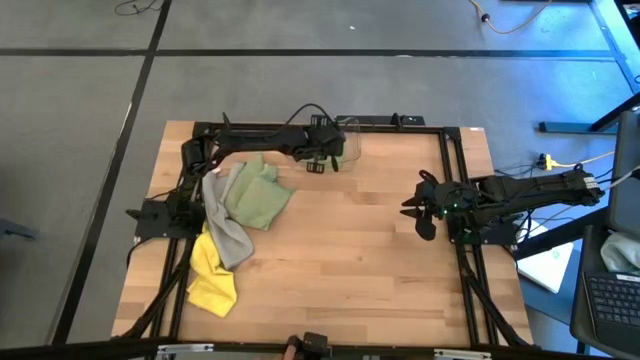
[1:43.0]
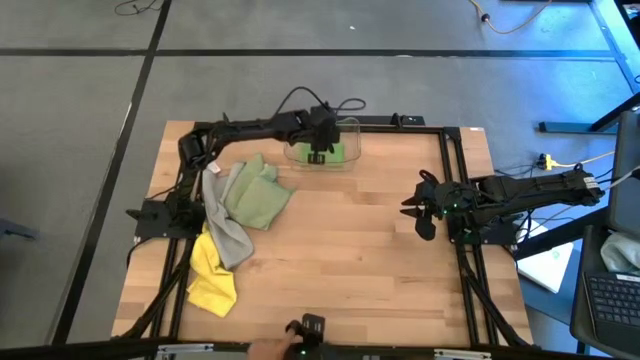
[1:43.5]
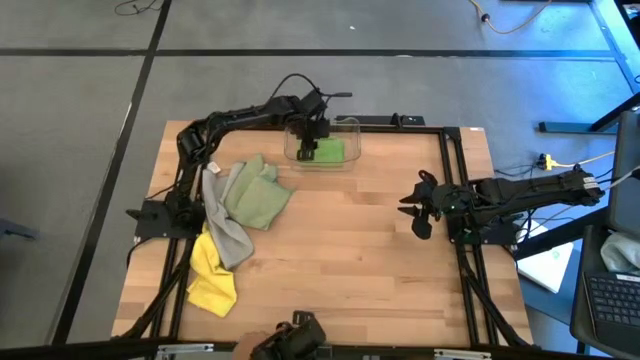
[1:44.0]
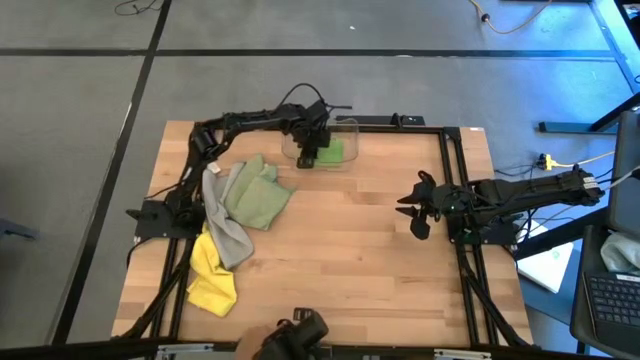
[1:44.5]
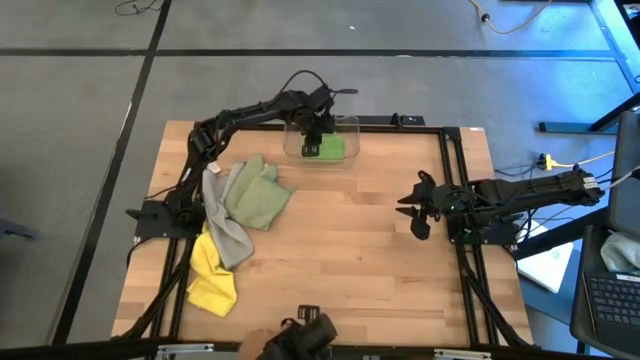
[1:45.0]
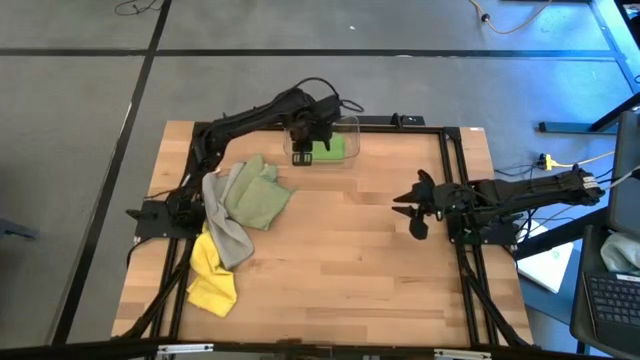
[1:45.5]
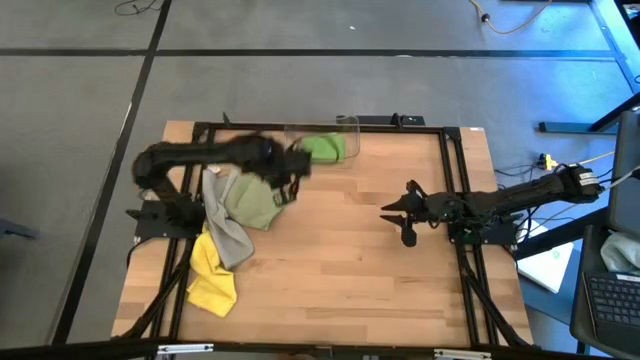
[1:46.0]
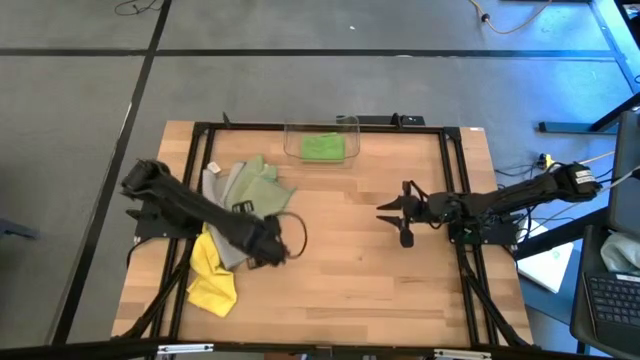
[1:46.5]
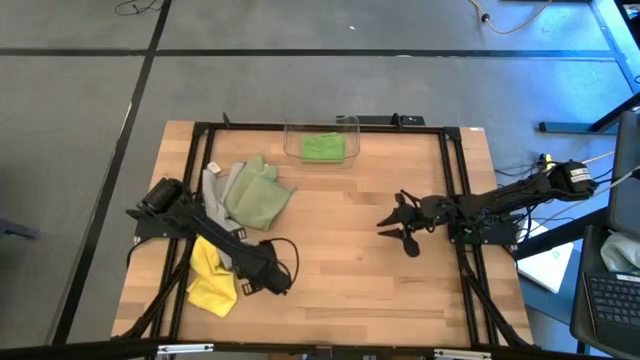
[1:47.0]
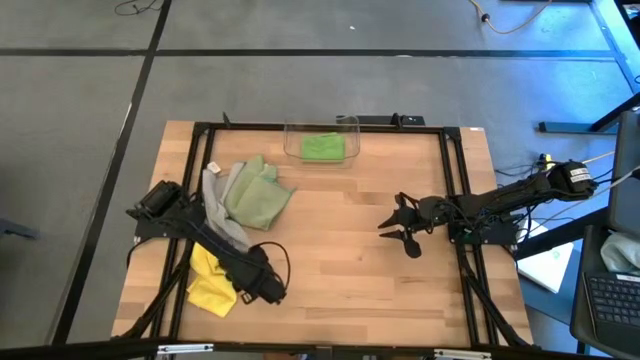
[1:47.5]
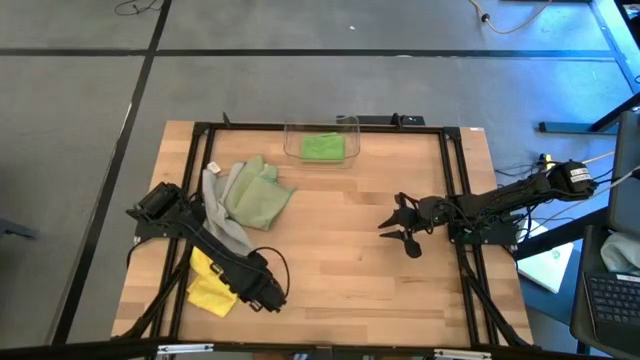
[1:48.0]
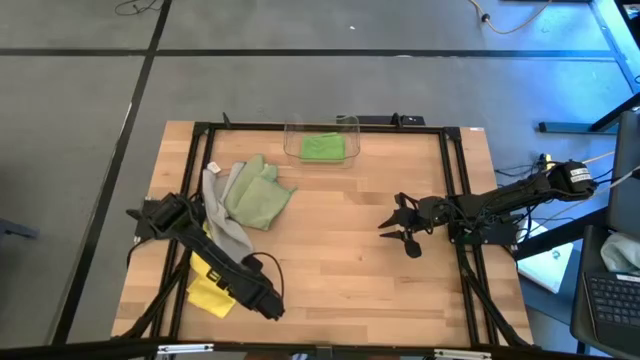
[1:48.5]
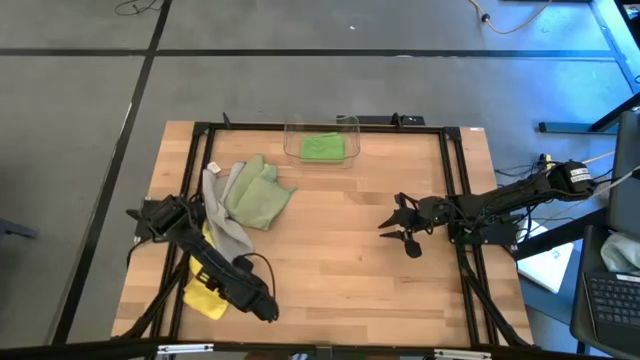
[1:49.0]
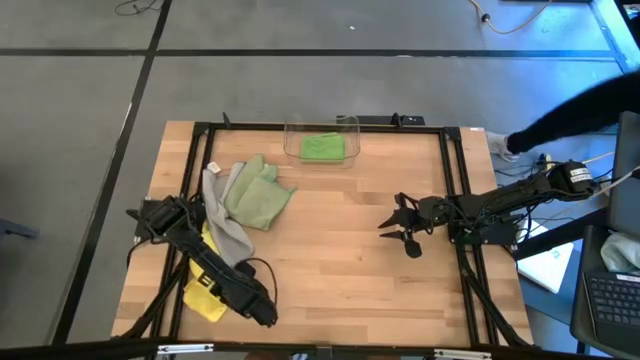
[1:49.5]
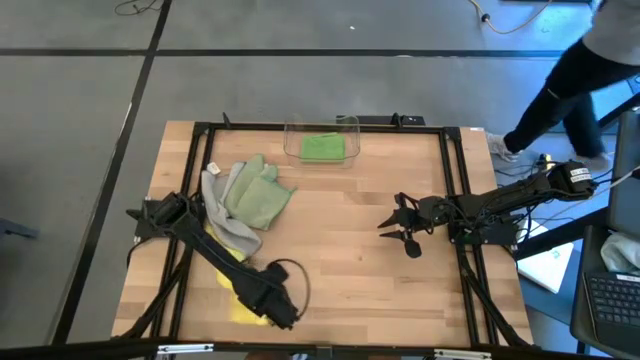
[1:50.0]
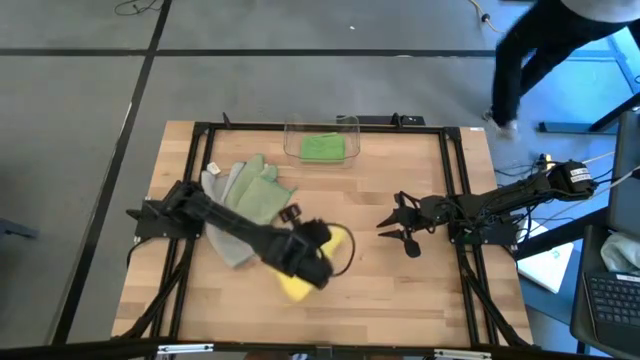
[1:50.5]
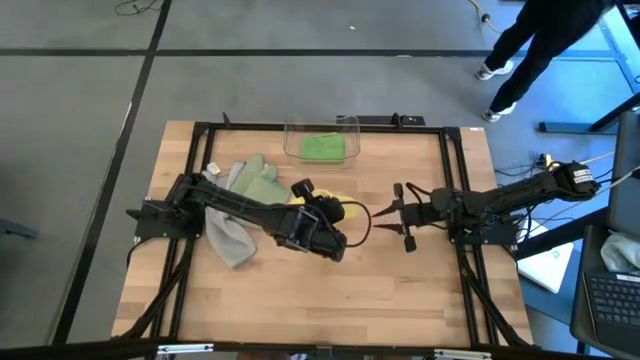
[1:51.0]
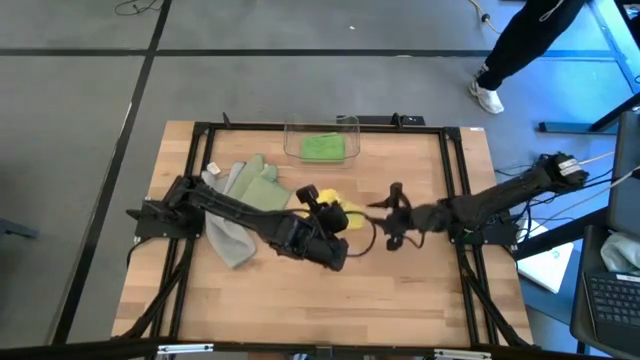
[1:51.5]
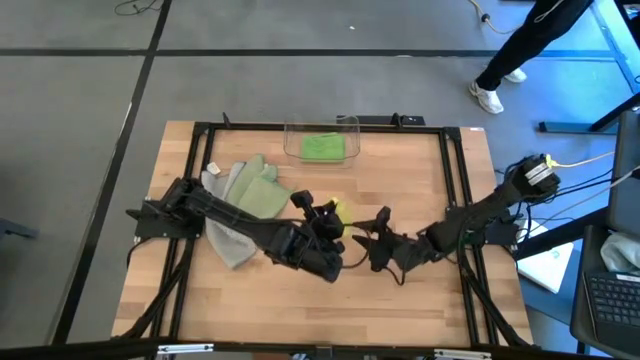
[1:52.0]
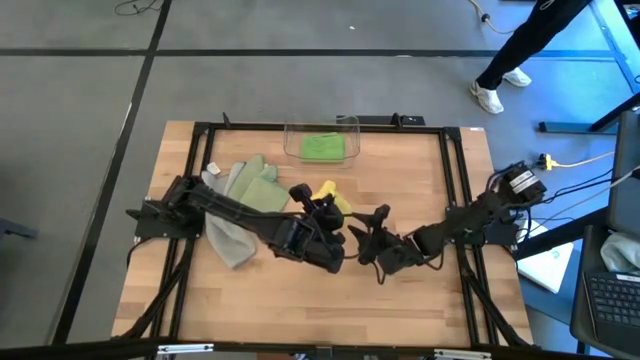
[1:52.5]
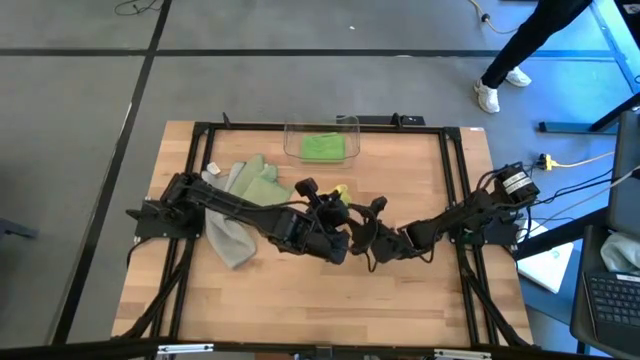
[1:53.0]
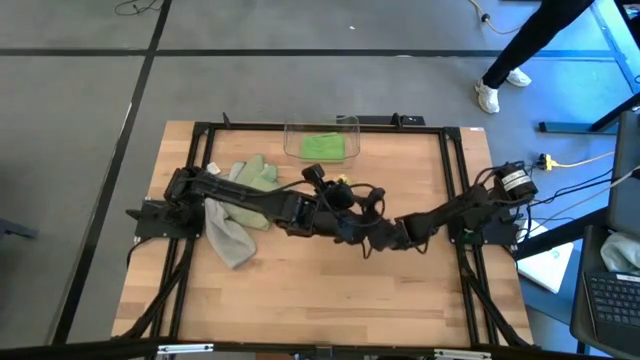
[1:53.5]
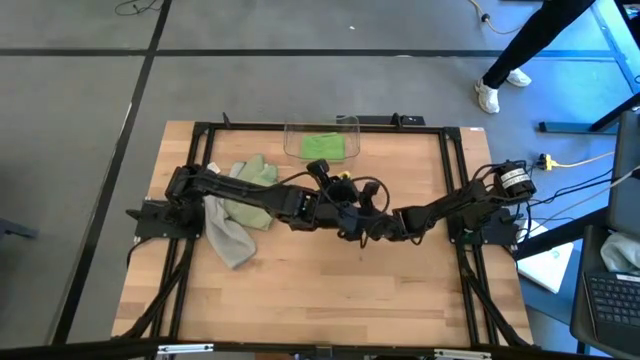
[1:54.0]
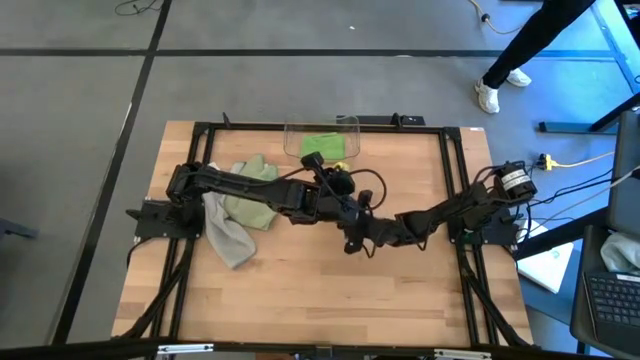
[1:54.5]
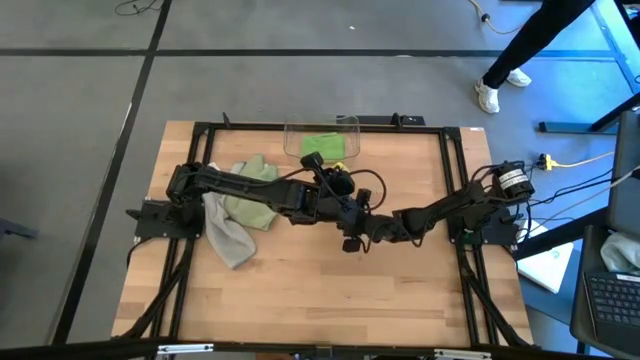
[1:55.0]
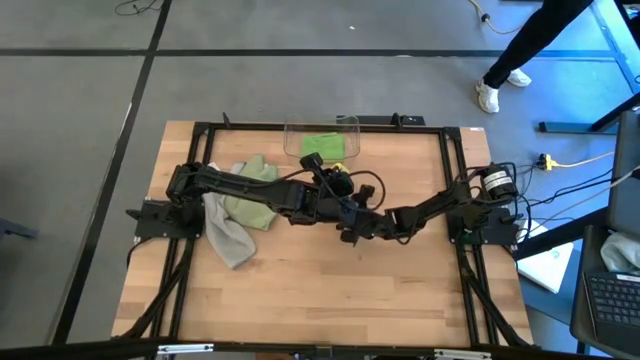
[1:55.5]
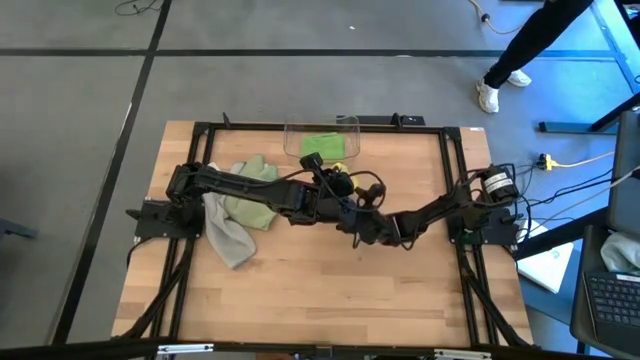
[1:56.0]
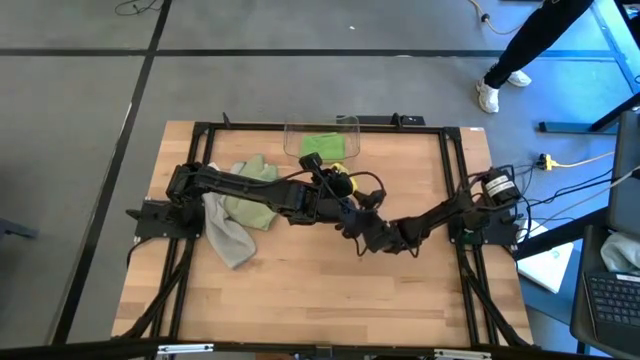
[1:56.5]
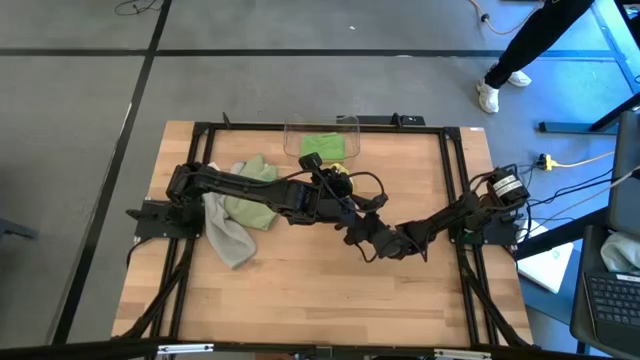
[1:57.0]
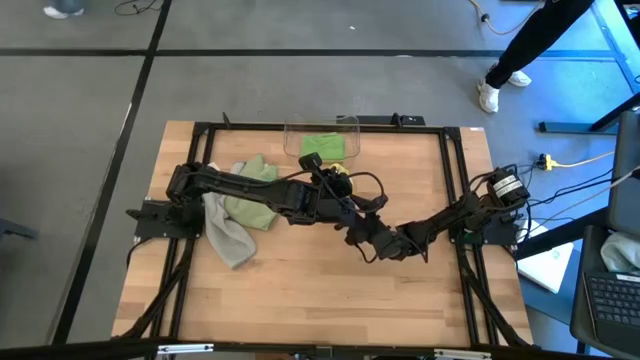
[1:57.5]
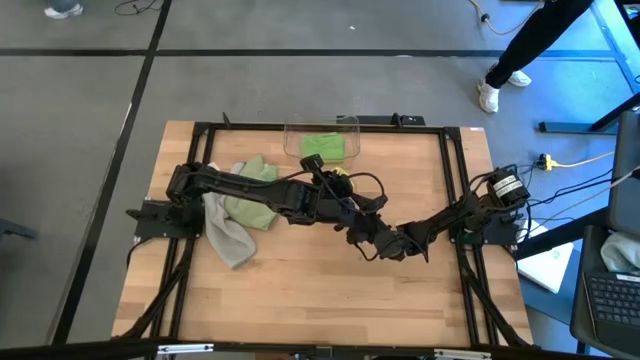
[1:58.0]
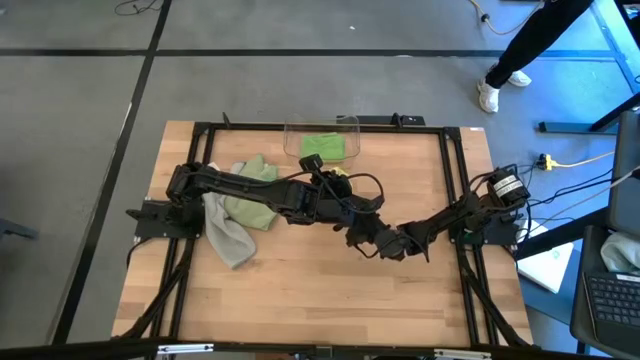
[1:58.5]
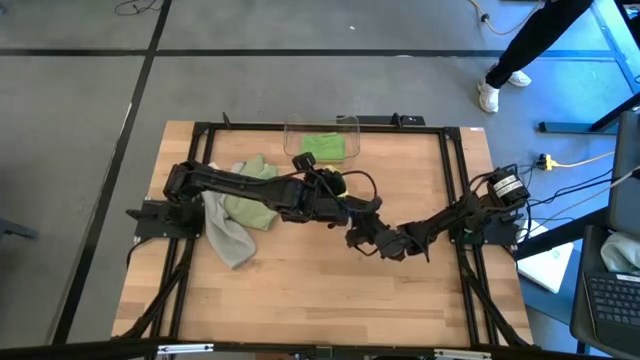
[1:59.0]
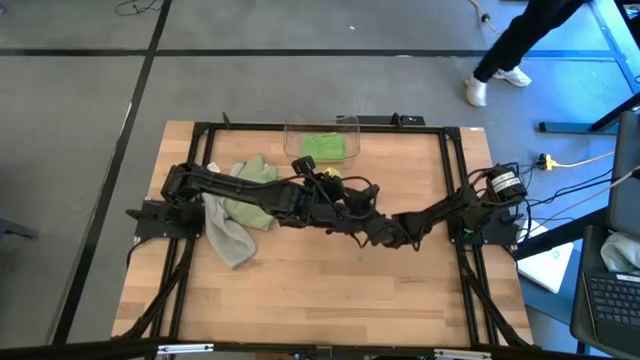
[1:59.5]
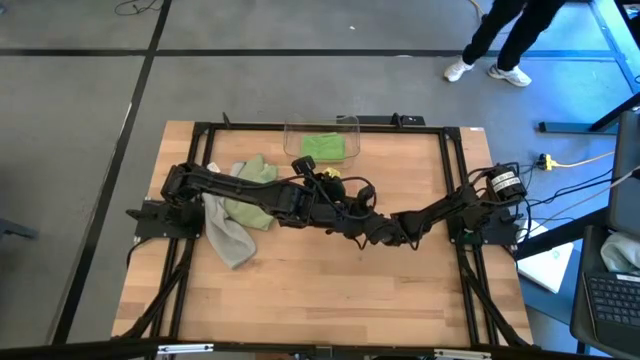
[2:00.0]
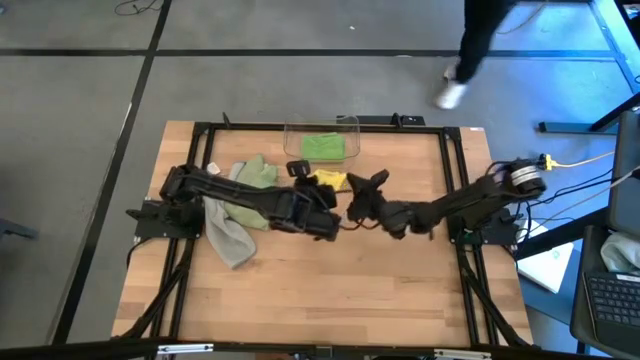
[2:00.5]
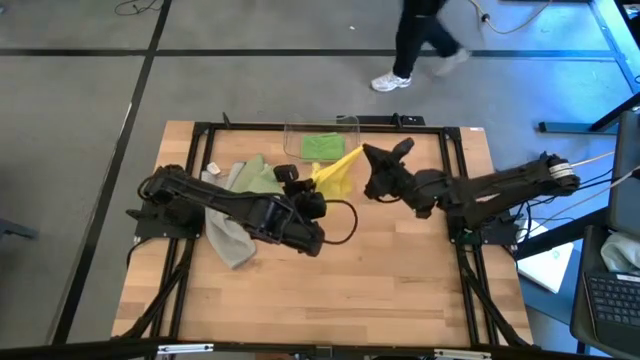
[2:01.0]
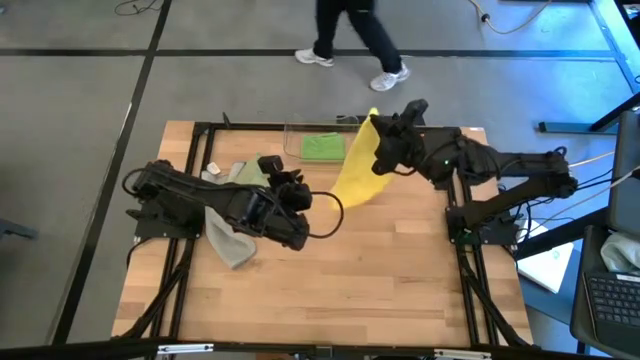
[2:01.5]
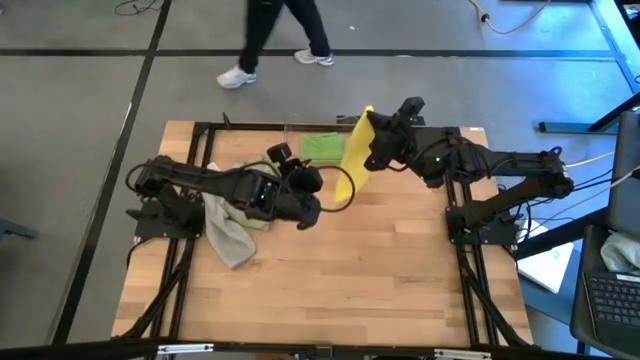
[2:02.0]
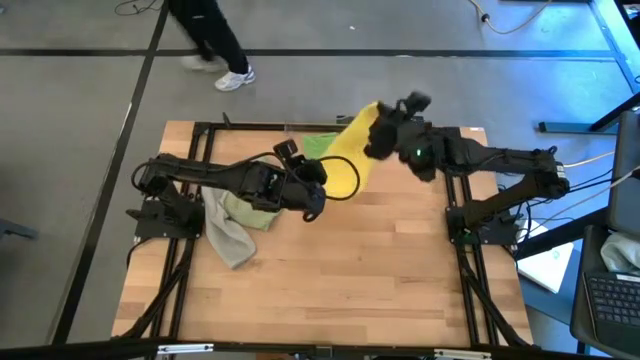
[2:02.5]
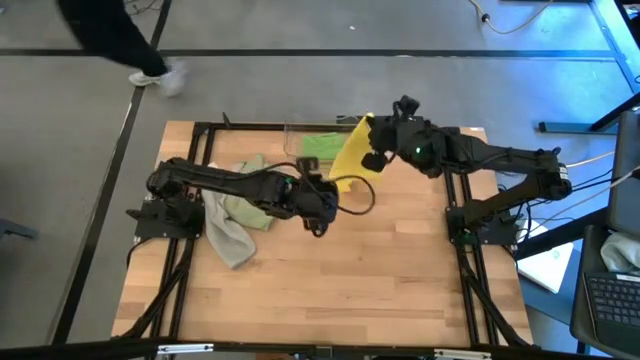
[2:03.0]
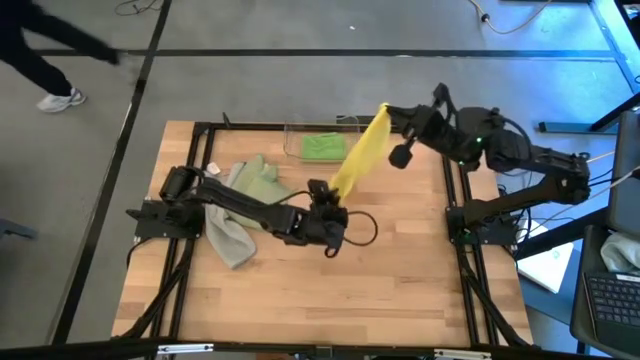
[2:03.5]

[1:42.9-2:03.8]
Task: Fold microfiber towels
Fold the yellow microfiber cloth

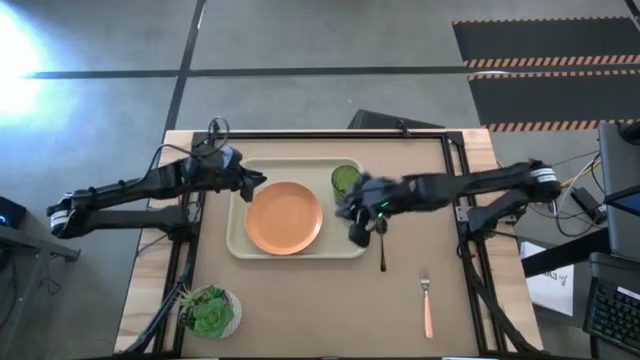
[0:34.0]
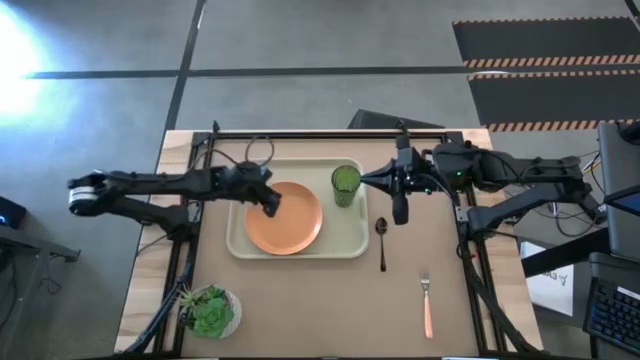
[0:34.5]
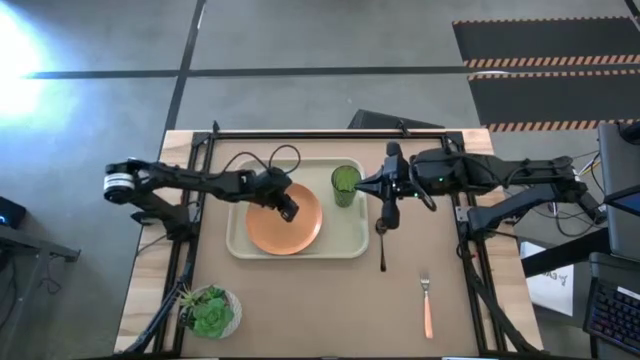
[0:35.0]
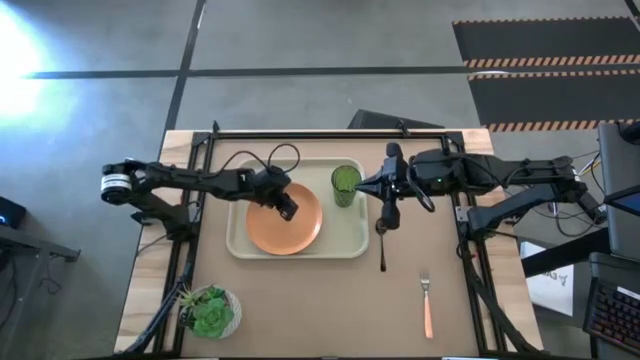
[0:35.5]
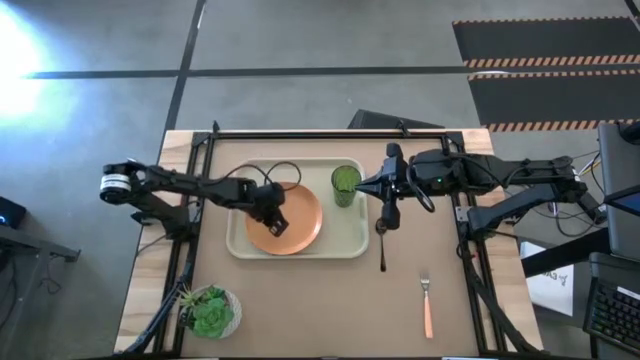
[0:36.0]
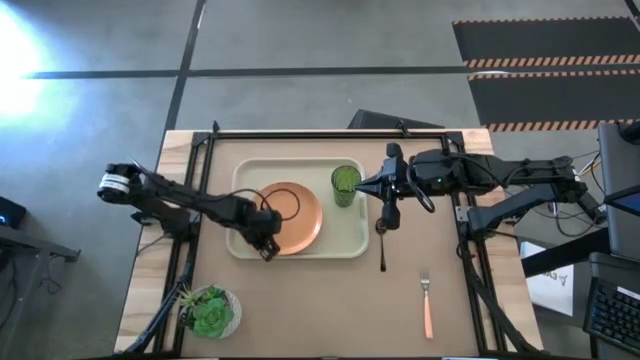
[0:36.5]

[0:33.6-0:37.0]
Task: Pick and place plate/cup/fork/spoon on tray
Adjust the orange plate on the white serving tray
